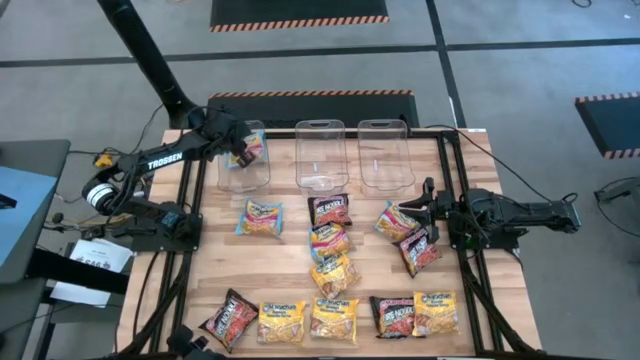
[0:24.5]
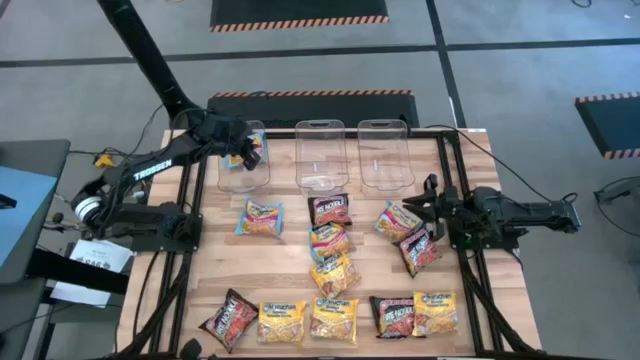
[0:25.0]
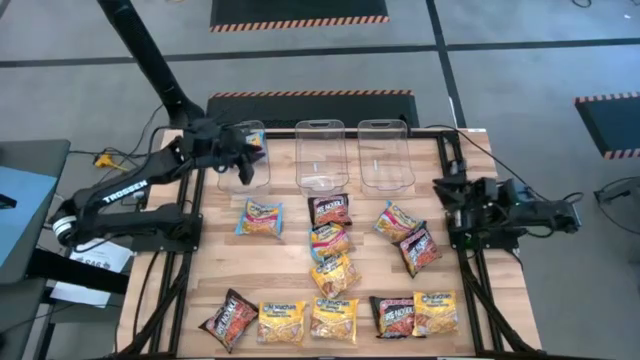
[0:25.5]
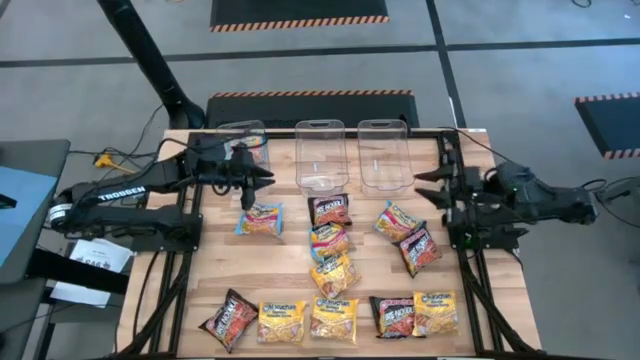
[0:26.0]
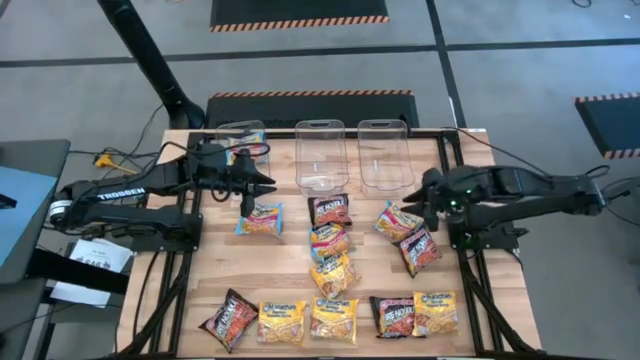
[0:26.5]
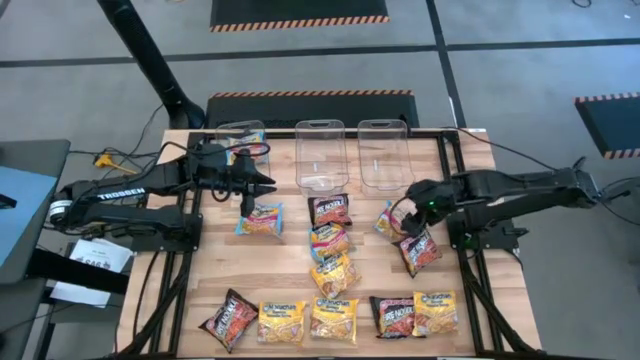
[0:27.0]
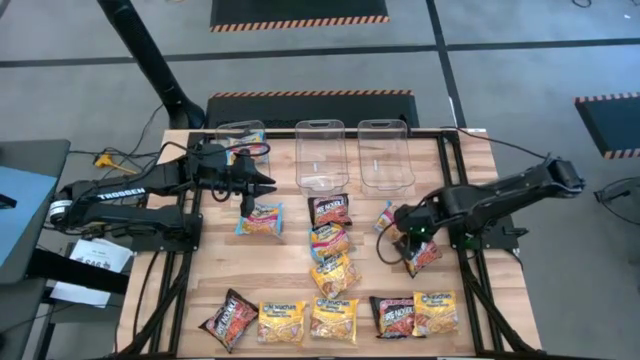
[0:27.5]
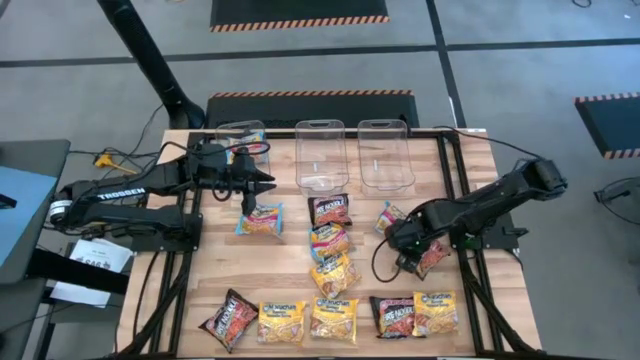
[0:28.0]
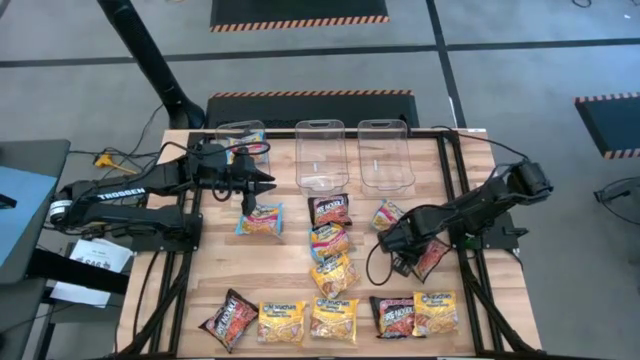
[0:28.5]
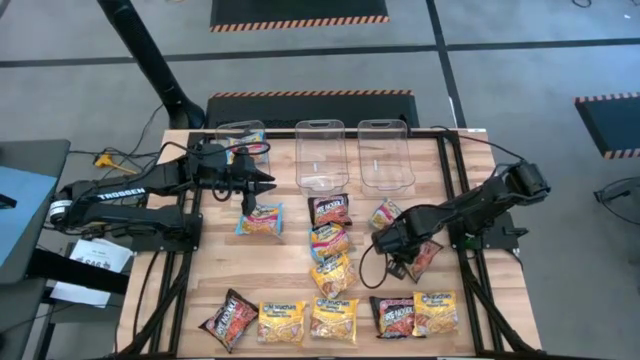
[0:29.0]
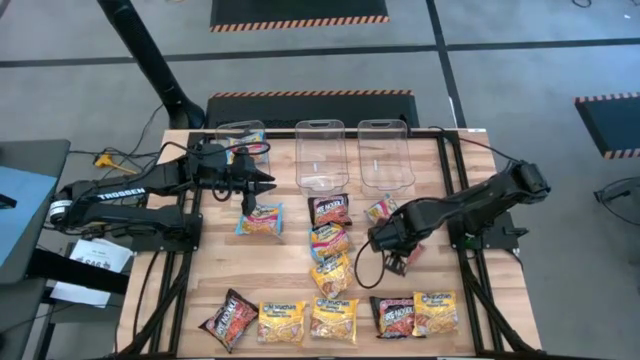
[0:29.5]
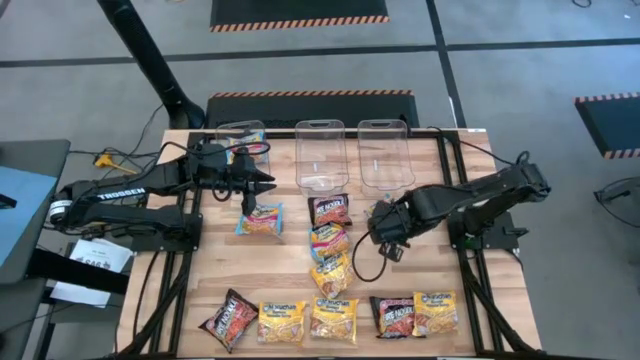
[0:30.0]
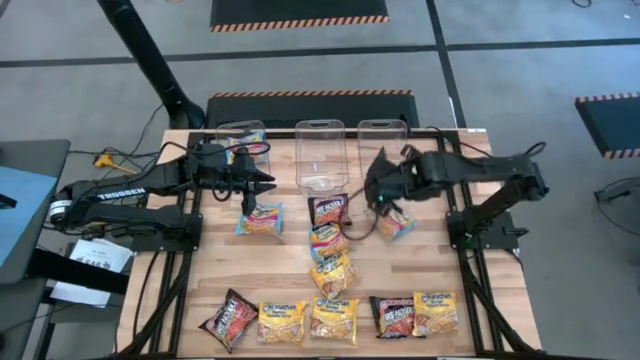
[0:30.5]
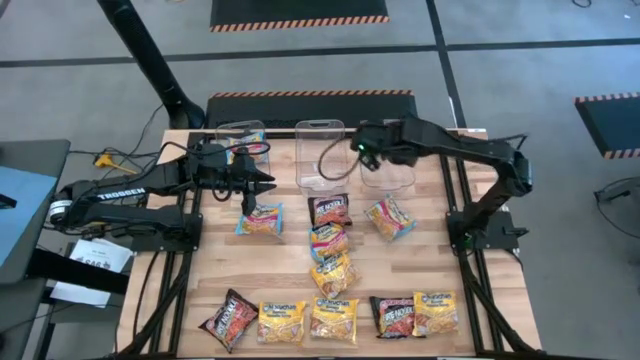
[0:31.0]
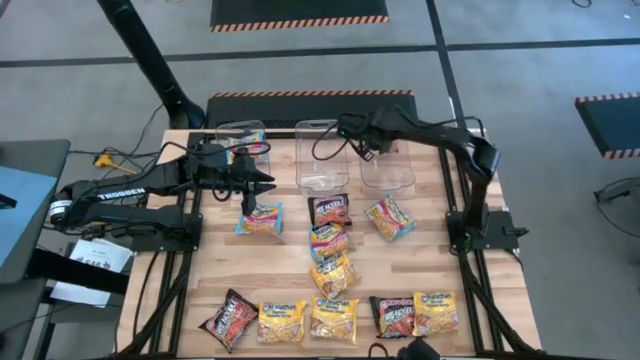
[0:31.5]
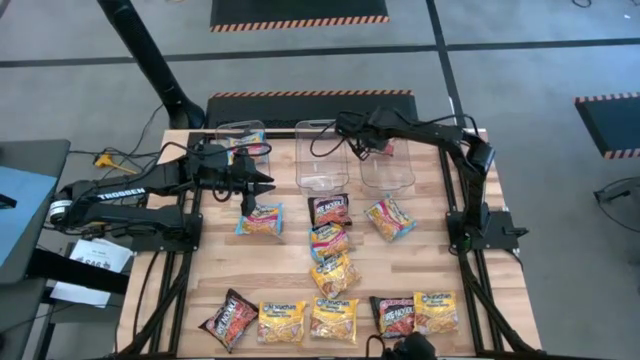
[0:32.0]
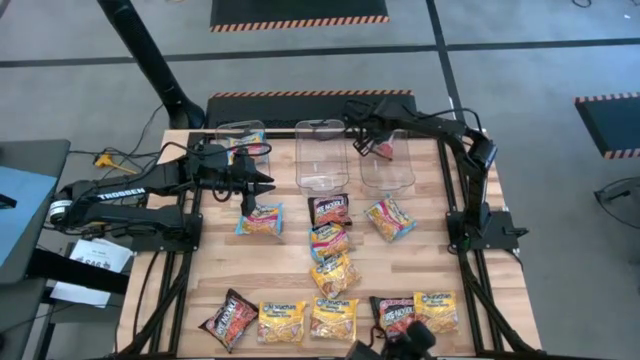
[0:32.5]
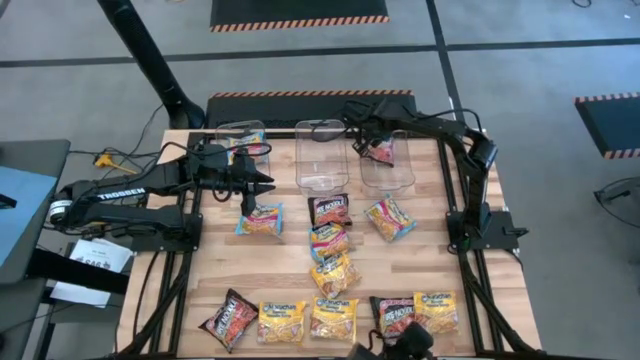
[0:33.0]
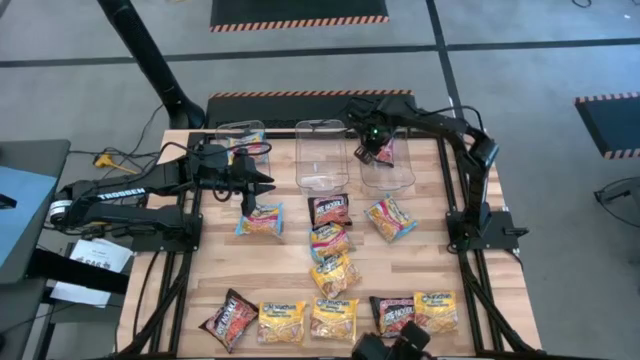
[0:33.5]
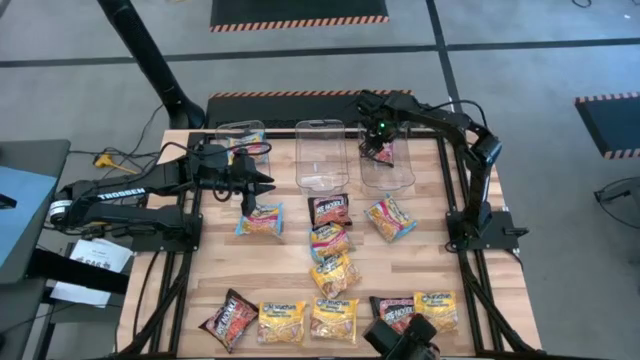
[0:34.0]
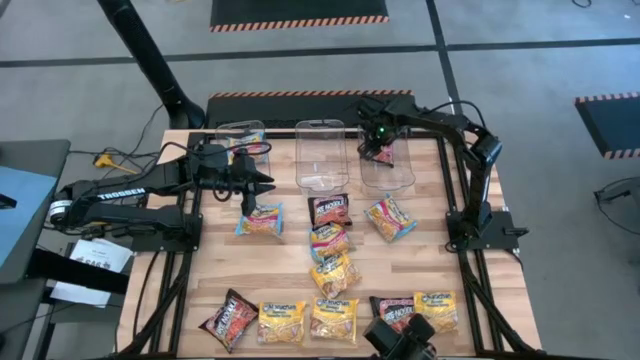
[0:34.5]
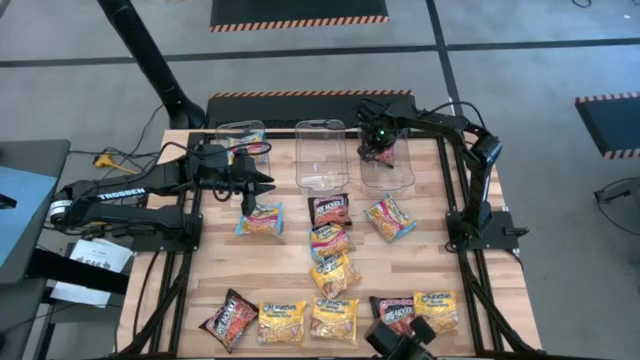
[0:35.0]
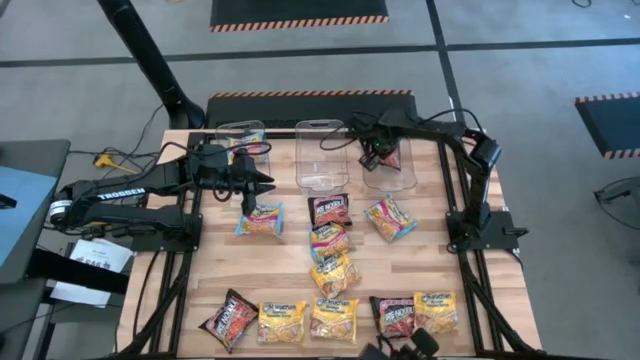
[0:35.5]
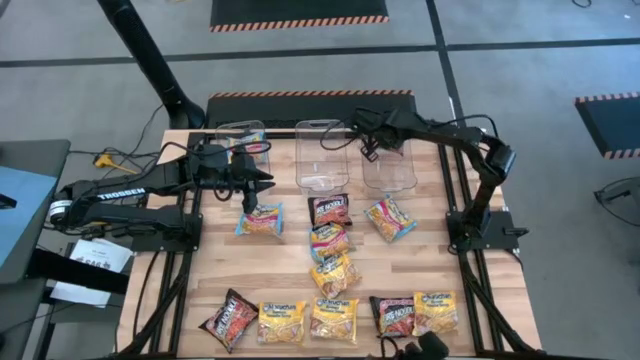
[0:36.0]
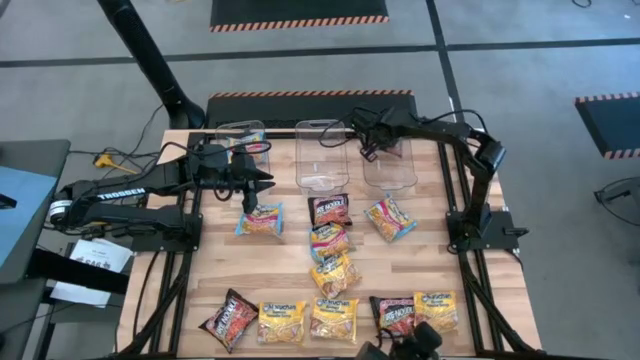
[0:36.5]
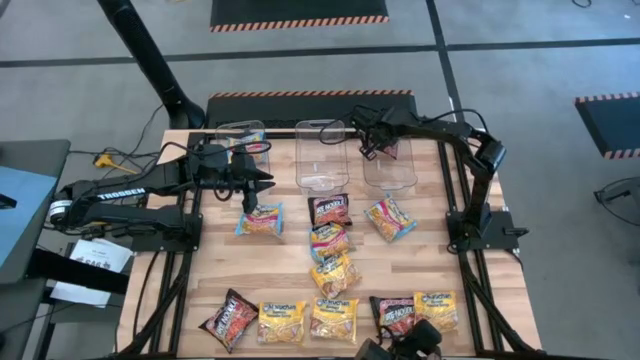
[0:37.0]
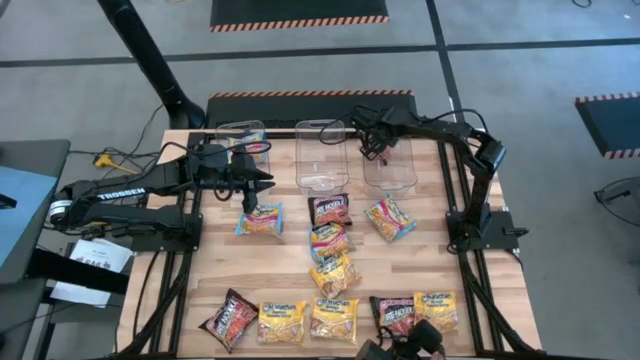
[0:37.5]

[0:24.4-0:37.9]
Task: Sort Maruchan noodles
Put the black noodle pack into the right transparent bin

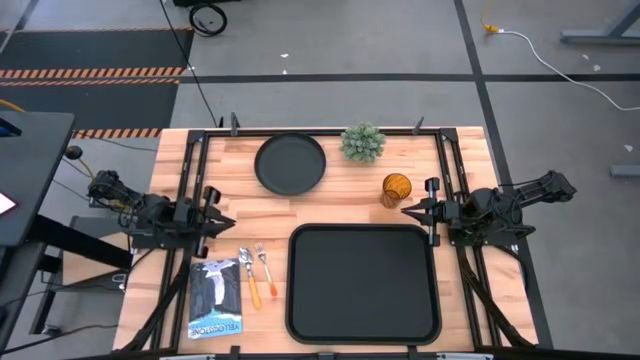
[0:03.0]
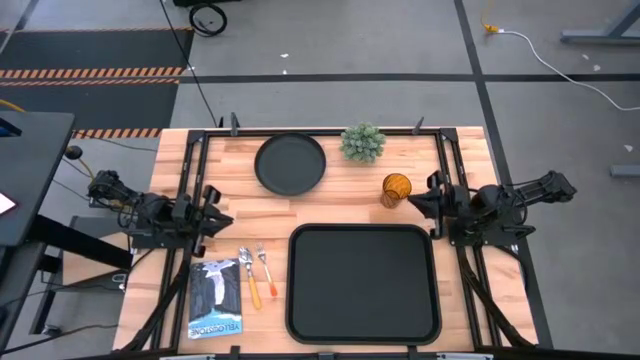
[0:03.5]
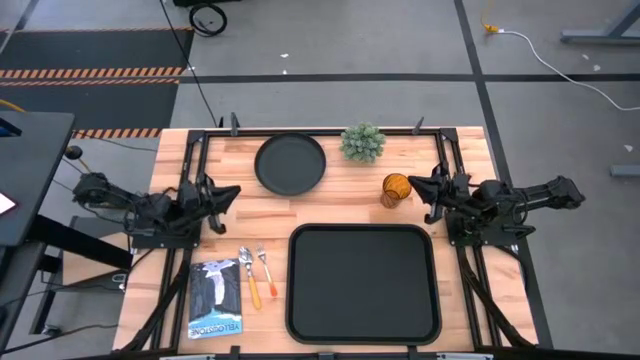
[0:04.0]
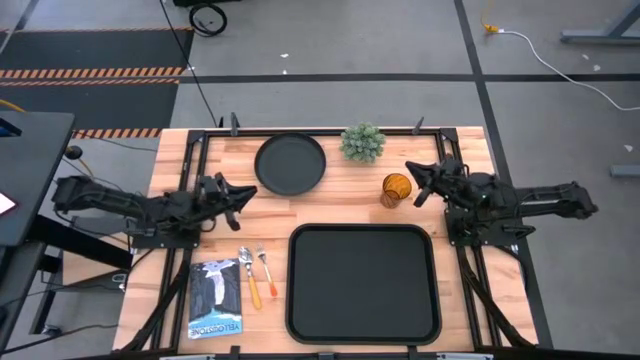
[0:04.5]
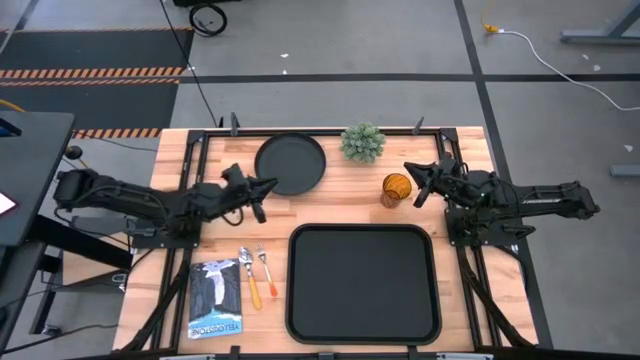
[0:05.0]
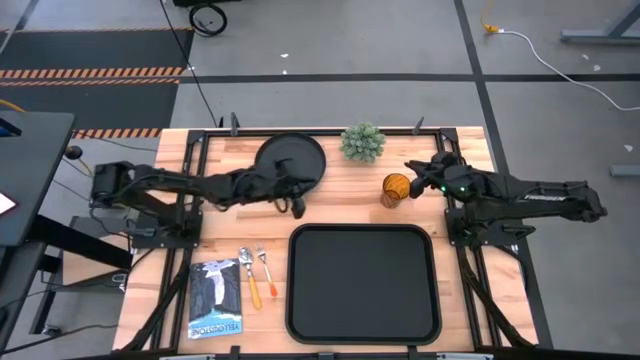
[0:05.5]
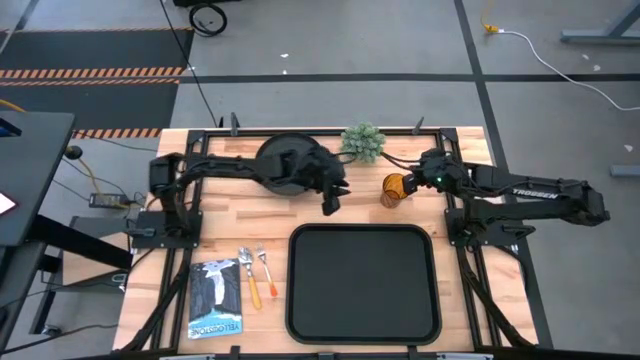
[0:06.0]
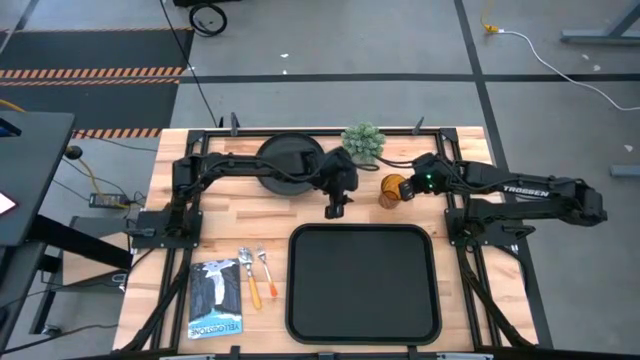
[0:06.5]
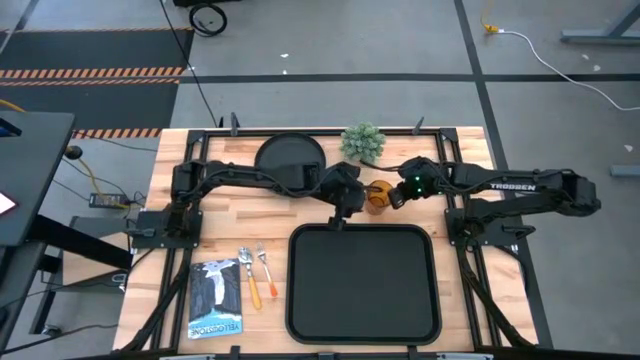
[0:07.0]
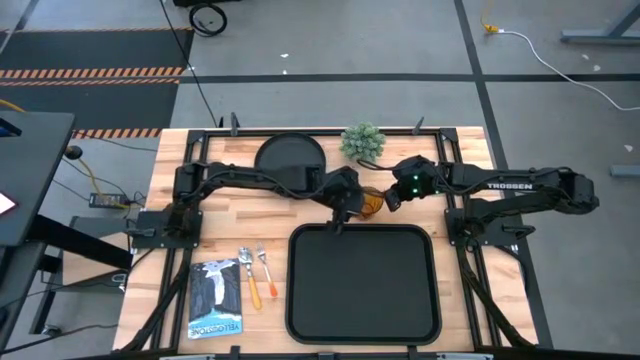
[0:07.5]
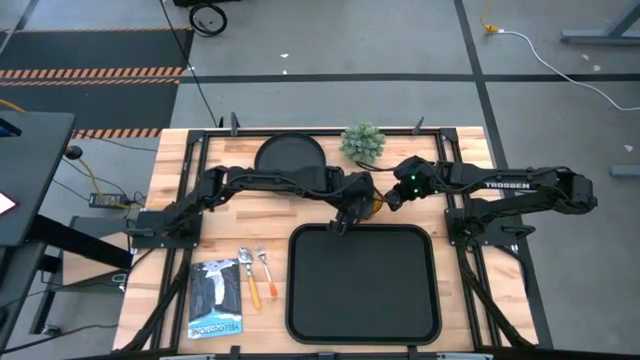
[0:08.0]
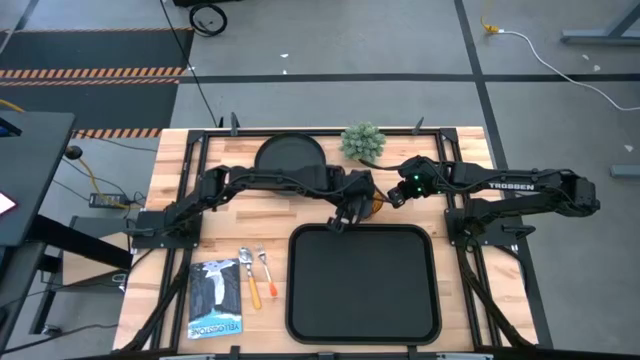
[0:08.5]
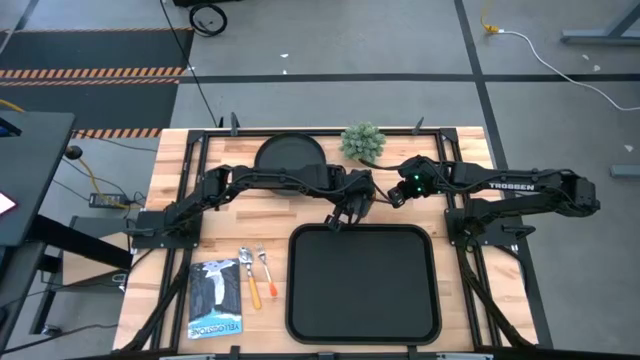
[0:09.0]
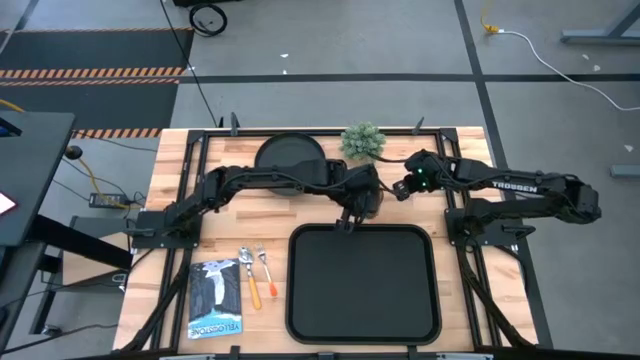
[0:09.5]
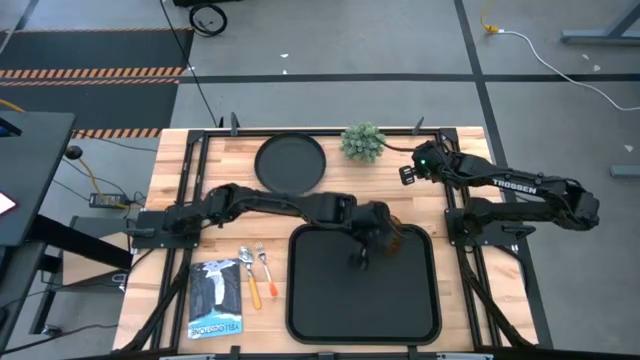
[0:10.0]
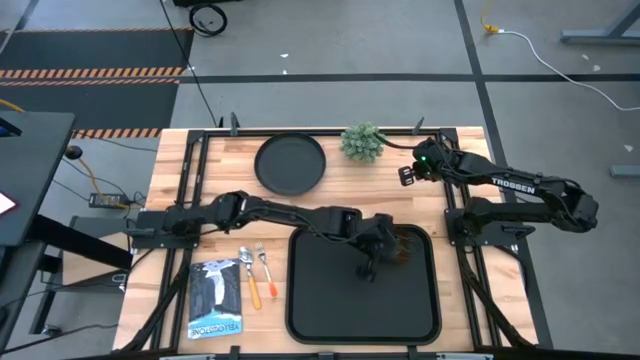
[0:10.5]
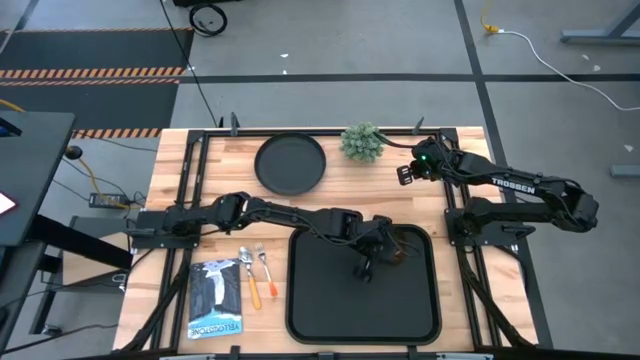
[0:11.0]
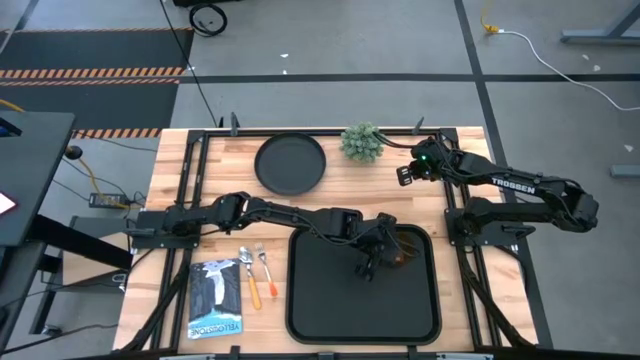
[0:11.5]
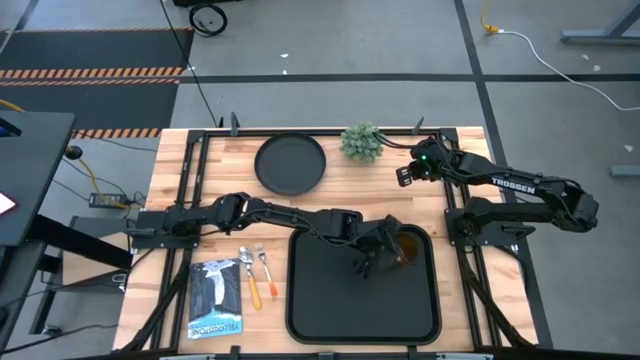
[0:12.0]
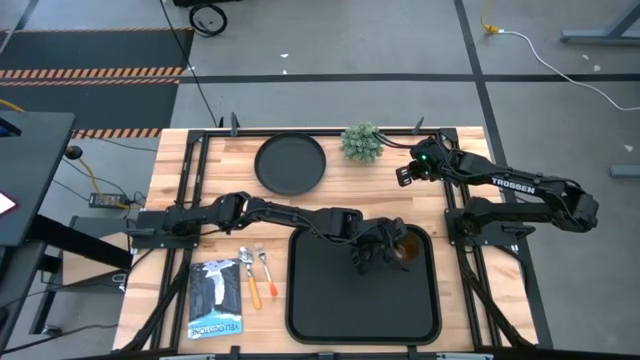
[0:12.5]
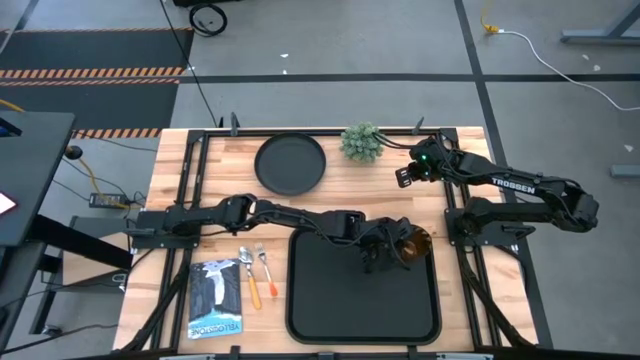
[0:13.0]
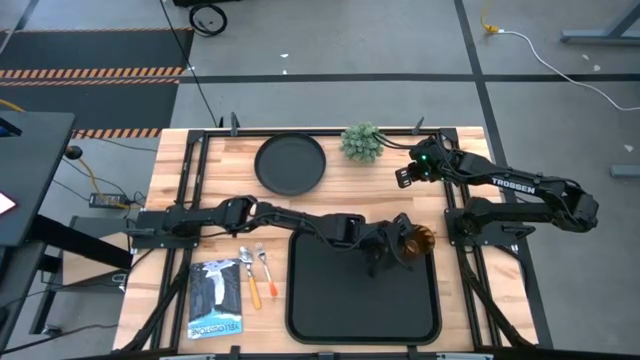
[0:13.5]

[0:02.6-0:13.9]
Task: Pick and place plate/cup/fork/spoon on tray
Put the brown cup on the black tray
